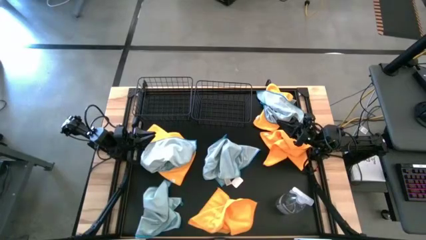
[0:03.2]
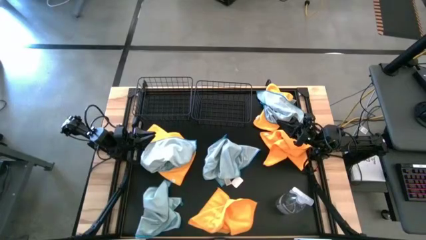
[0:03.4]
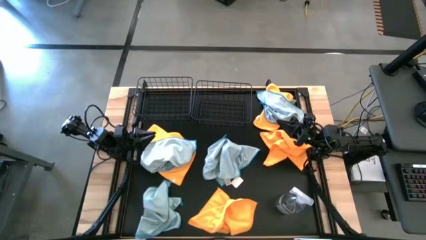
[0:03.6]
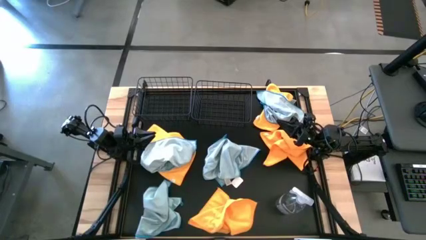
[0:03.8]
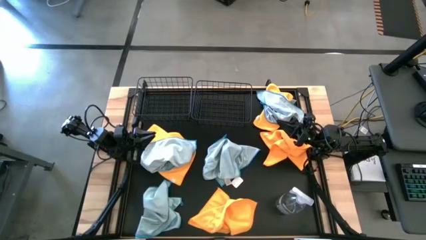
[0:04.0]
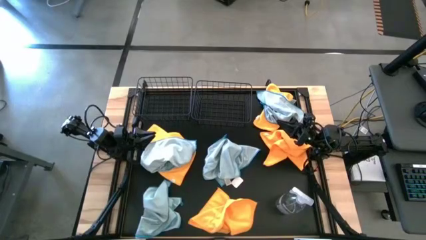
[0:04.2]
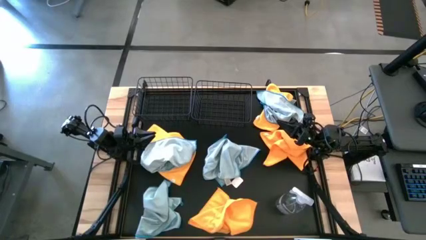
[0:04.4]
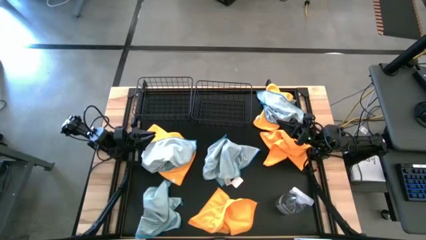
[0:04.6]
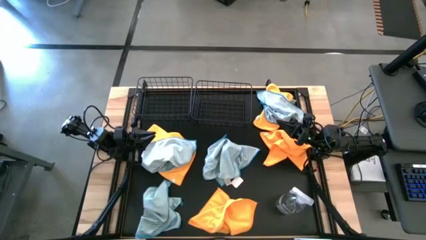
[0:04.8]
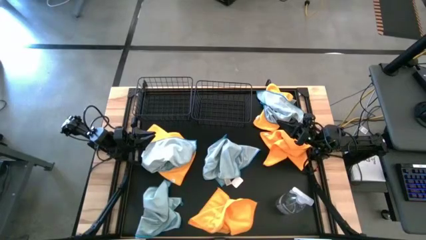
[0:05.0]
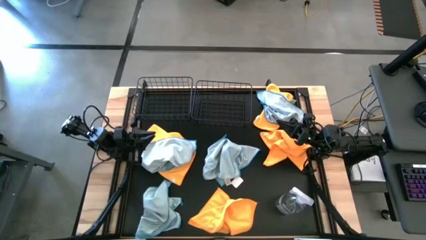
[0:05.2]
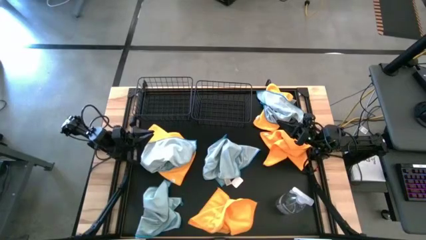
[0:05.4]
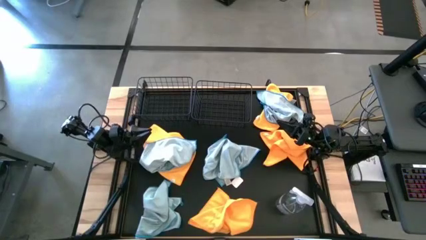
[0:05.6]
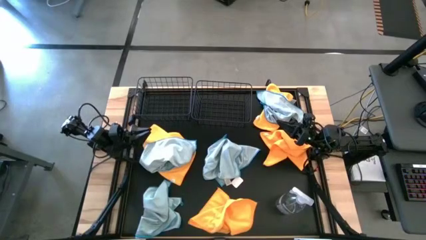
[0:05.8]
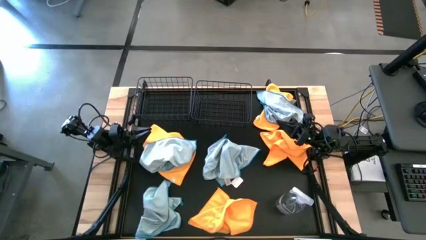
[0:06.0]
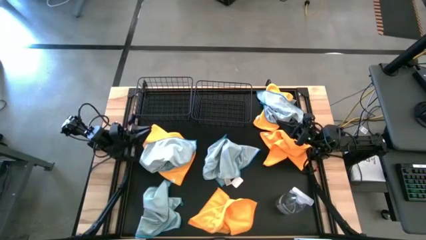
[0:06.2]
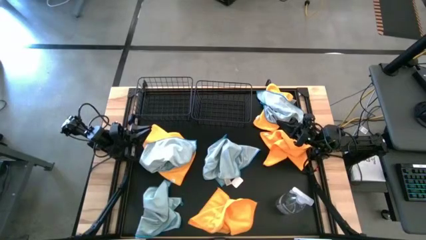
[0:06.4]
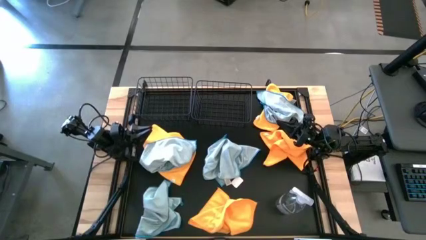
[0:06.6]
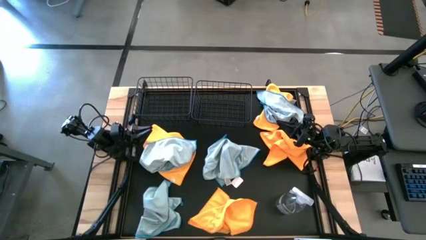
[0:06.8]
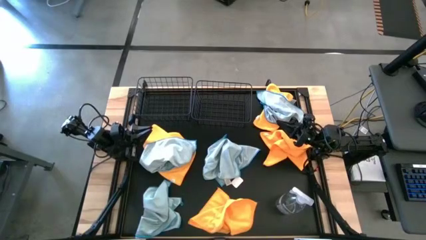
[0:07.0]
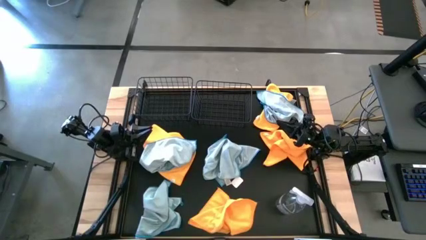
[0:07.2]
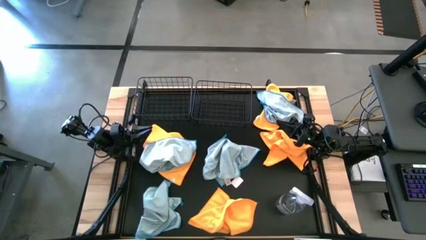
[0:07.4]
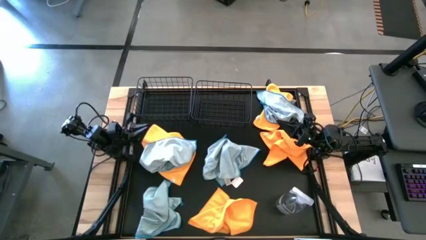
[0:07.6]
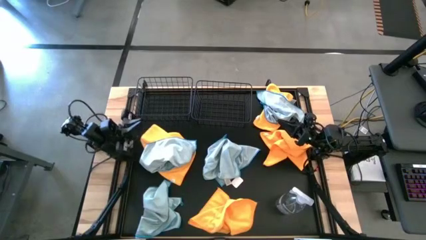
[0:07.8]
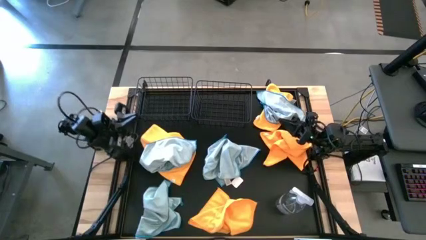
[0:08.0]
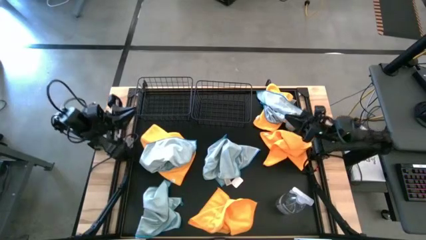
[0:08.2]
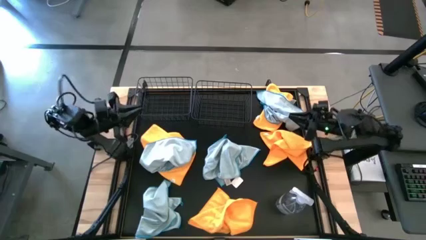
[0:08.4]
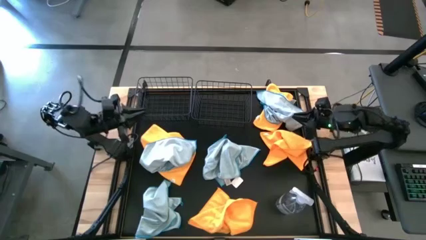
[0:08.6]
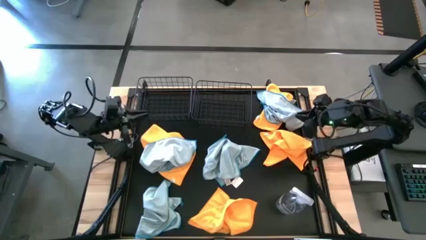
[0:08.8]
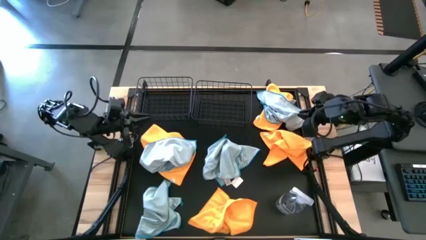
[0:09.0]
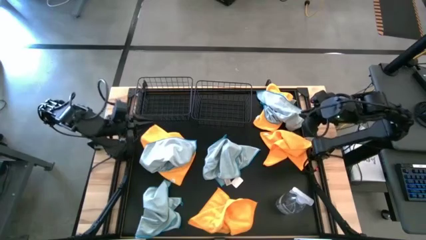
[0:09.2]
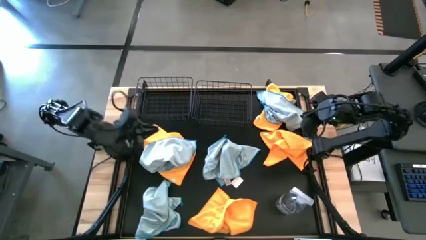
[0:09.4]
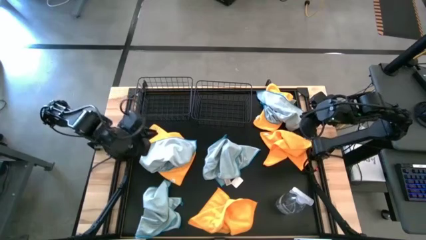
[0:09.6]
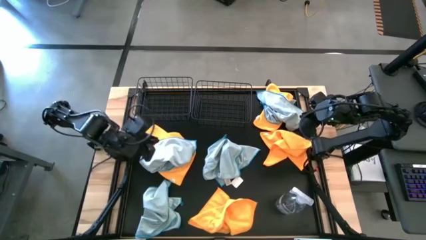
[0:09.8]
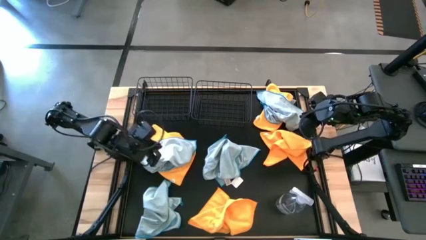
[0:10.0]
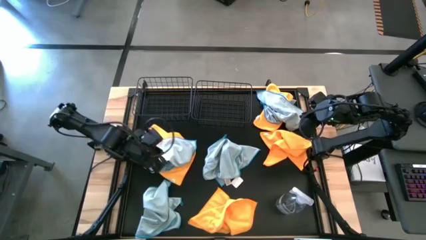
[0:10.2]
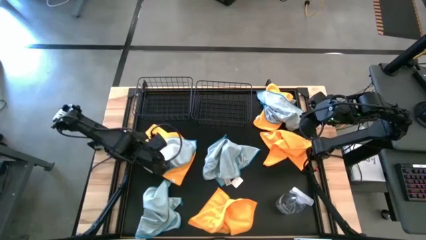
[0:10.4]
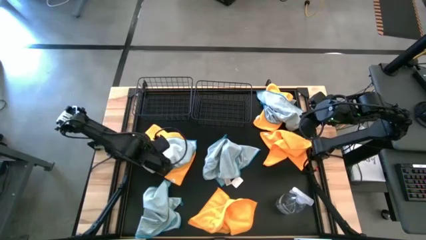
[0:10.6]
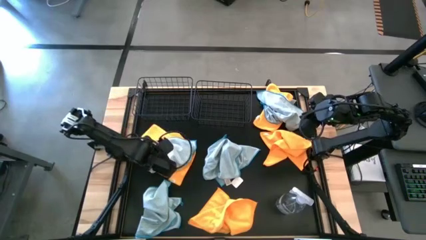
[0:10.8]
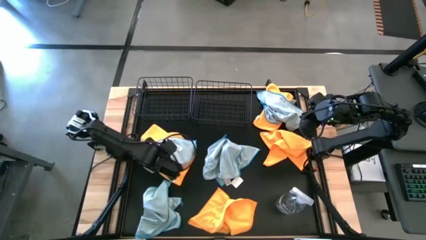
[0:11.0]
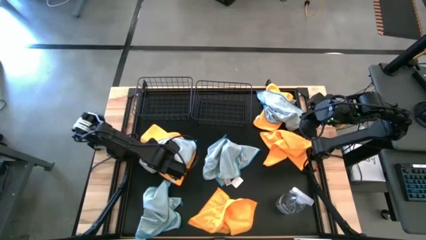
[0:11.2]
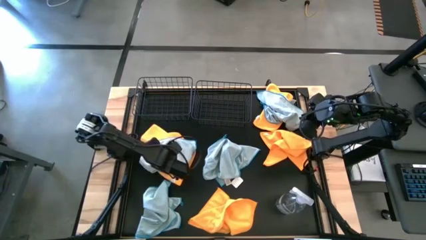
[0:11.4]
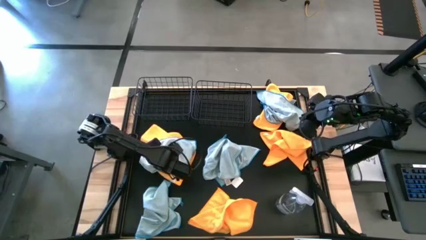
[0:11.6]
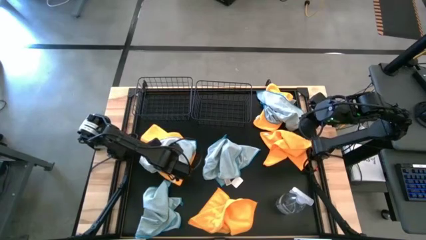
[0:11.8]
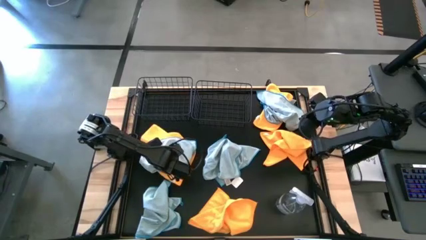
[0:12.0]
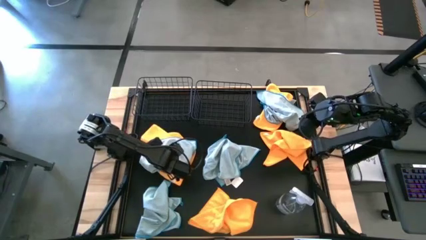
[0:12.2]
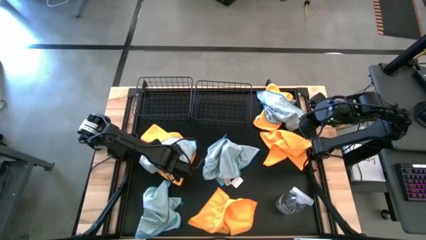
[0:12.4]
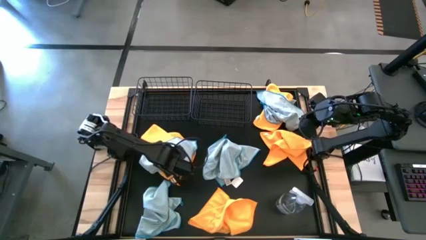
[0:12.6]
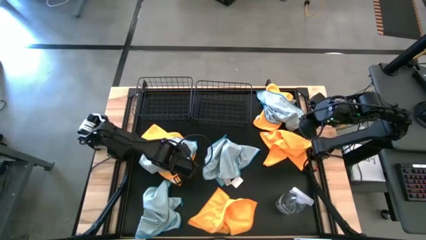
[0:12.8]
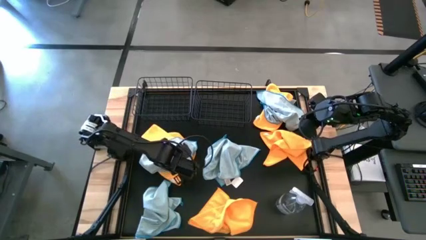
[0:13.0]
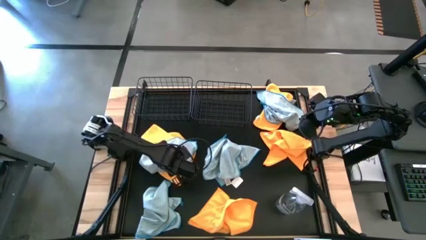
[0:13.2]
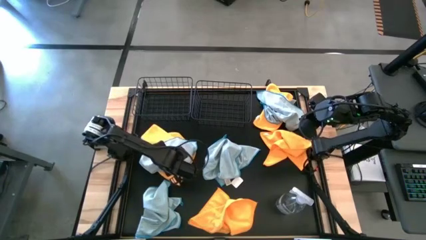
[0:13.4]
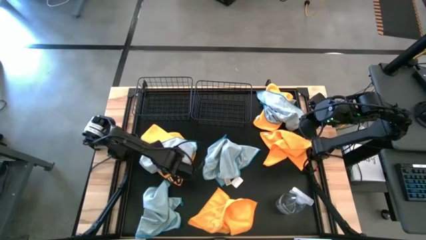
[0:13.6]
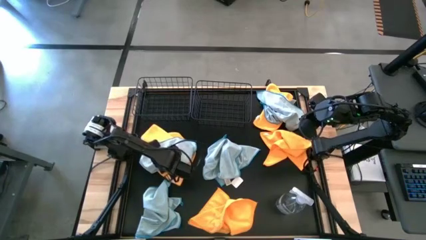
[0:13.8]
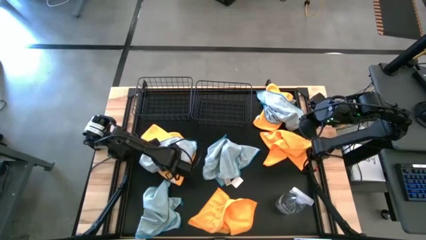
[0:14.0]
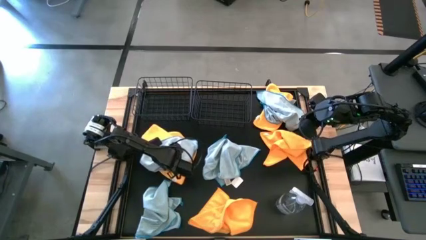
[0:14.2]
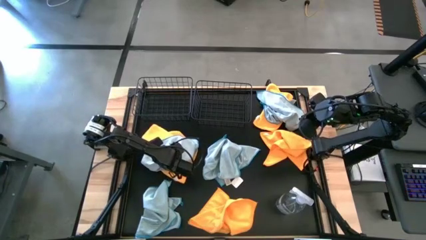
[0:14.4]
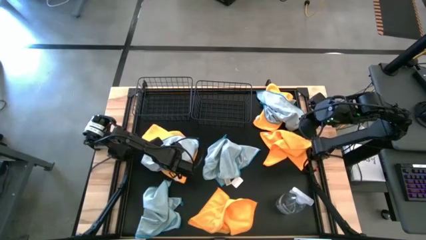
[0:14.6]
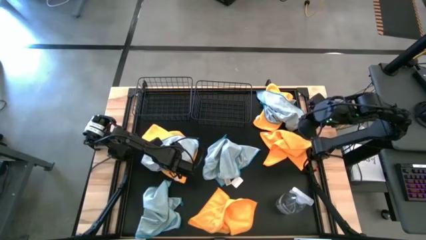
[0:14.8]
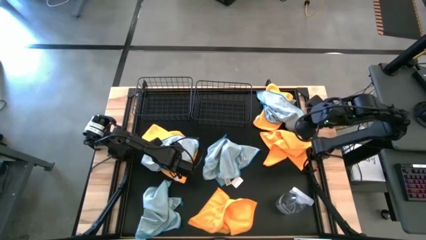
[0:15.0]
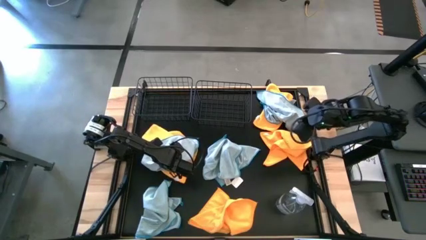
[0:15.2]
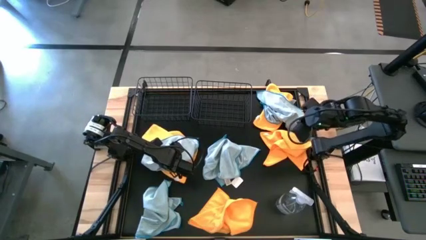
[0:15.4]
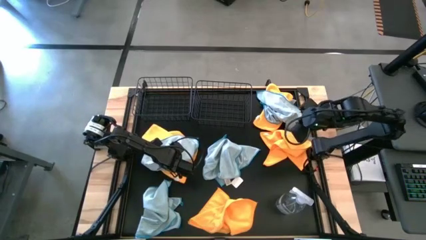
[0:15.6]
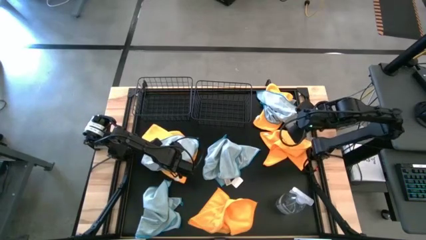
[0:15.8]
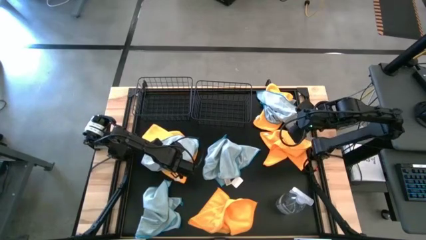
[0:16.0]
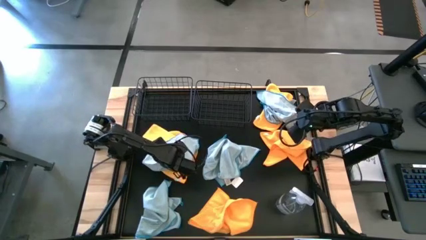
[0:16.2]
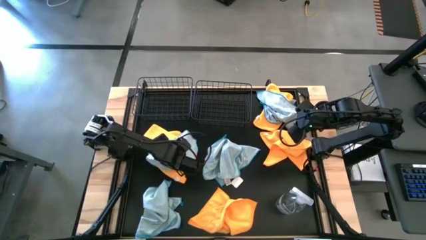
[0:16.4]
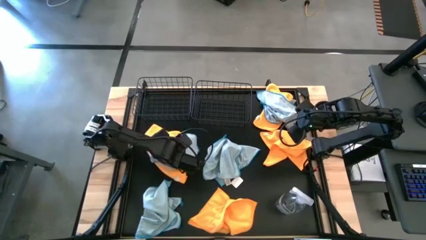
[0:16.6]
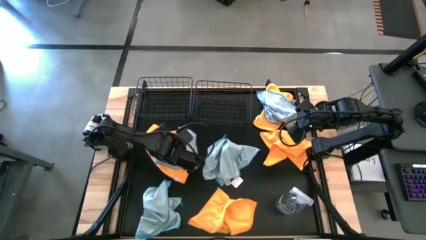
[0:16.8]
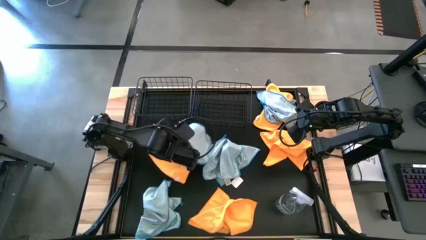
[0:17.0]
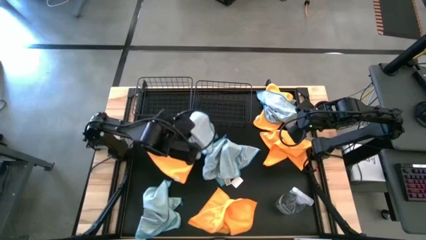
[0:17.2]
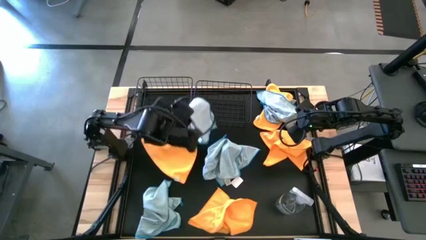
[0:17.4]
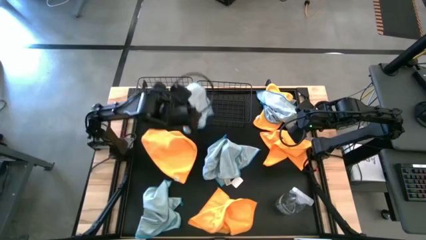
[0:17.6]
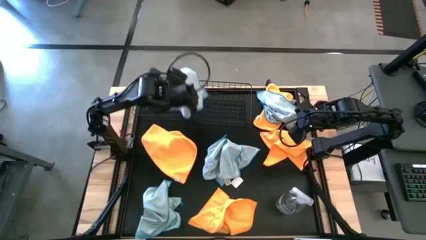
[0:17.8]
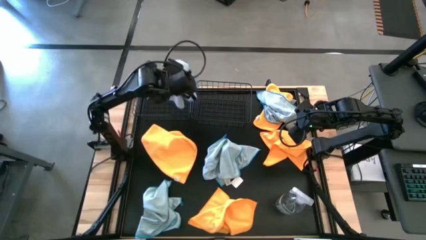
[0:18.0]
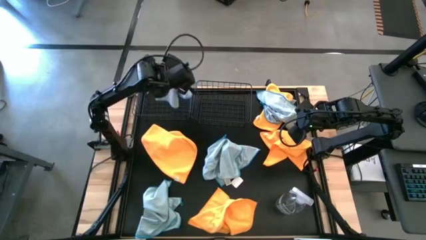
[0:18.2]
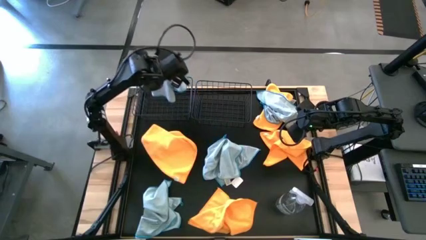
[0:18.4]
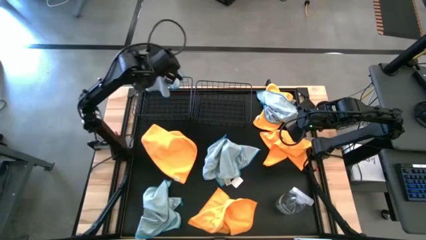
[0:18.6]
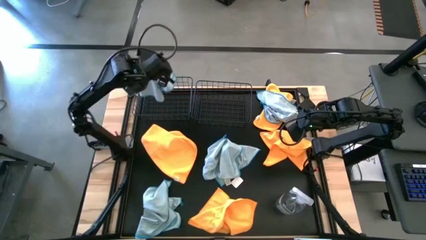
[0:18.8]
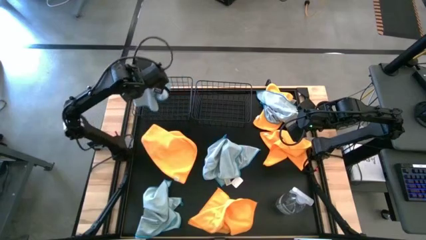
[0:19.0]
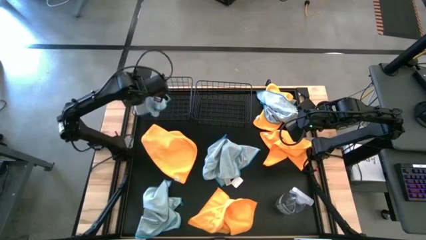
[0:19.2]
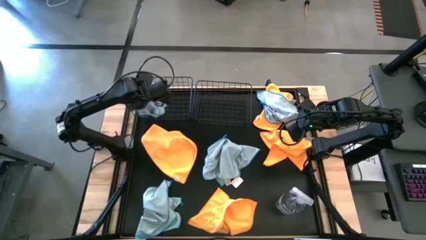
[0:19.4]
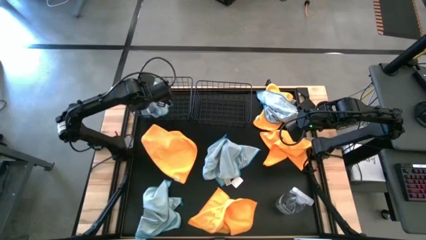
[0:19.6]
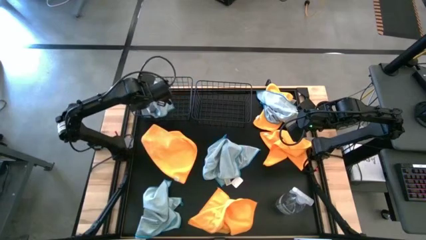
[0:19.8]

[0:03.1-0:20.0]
Task: Sort microfiber towel by color & place in baskets
Put the blue towel into the left black wire basket
